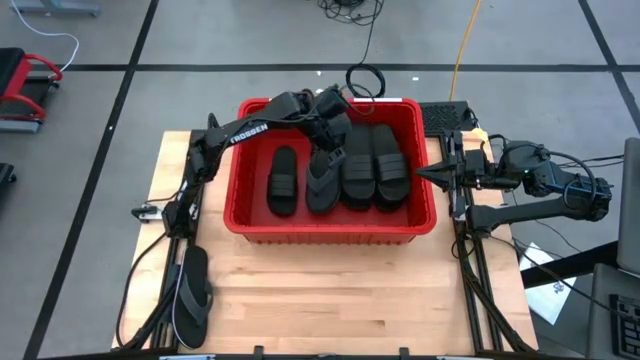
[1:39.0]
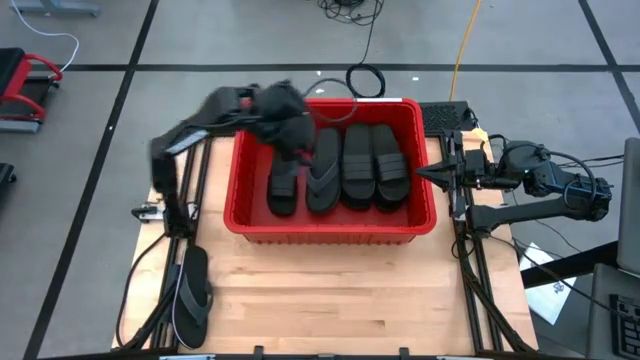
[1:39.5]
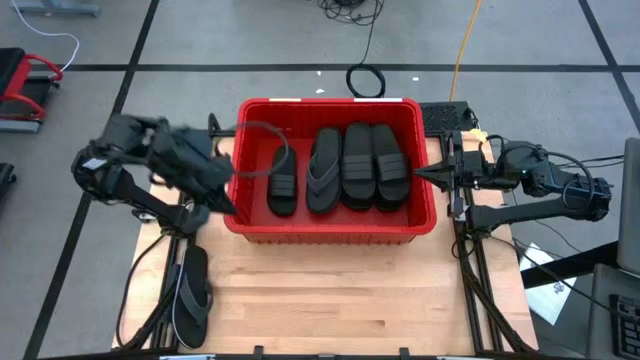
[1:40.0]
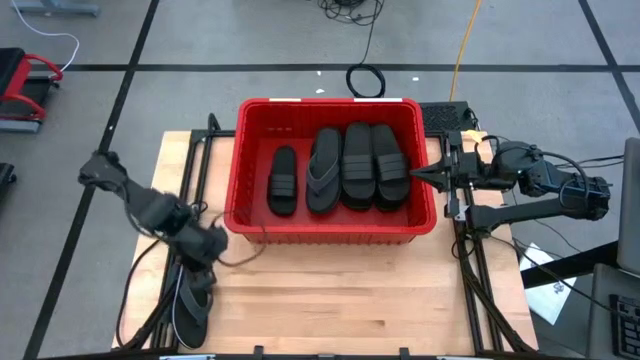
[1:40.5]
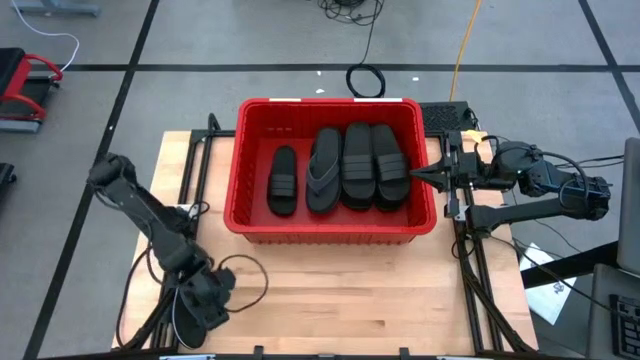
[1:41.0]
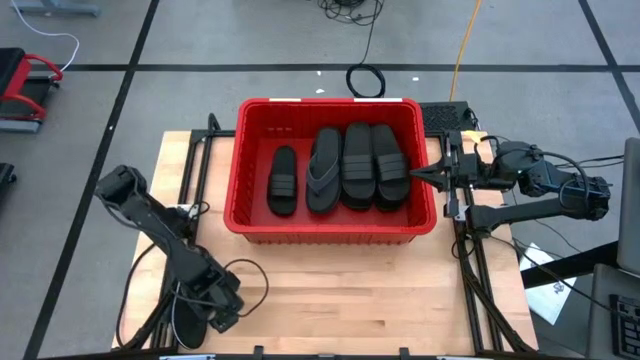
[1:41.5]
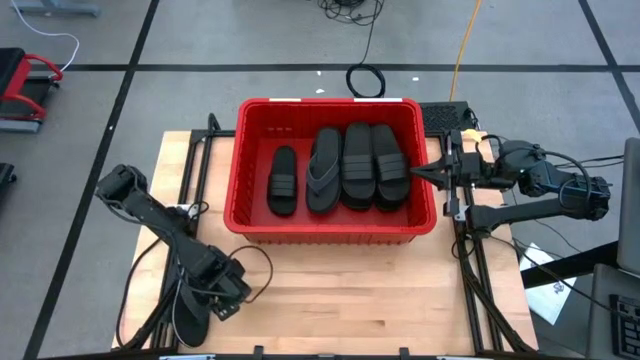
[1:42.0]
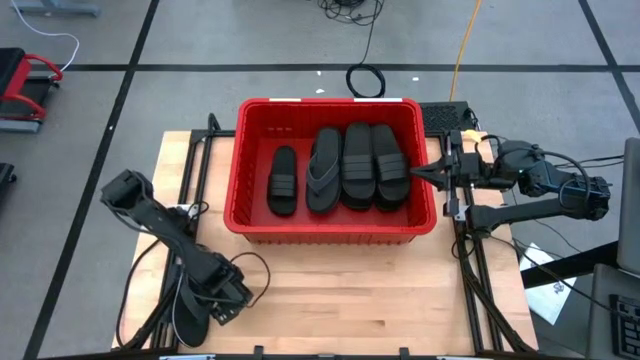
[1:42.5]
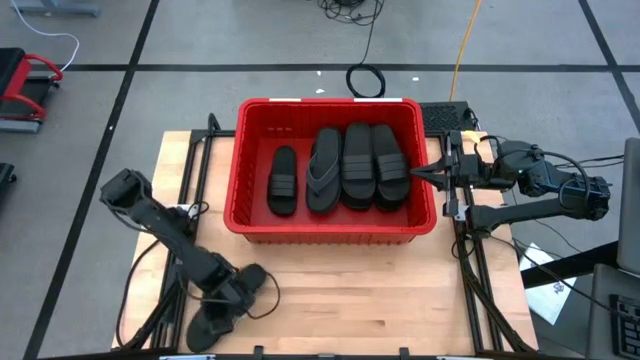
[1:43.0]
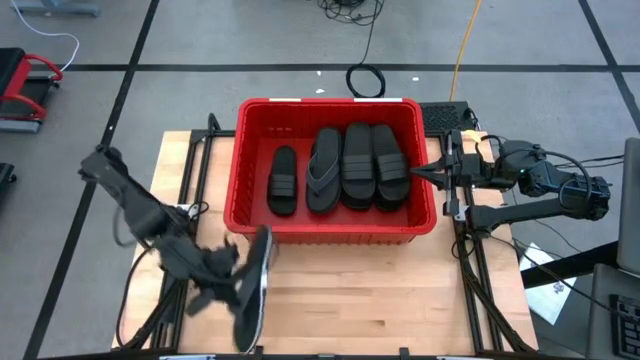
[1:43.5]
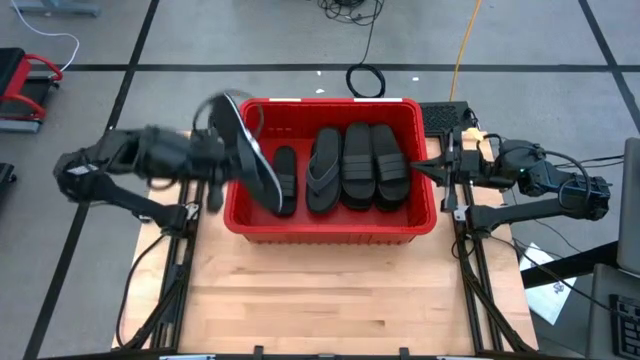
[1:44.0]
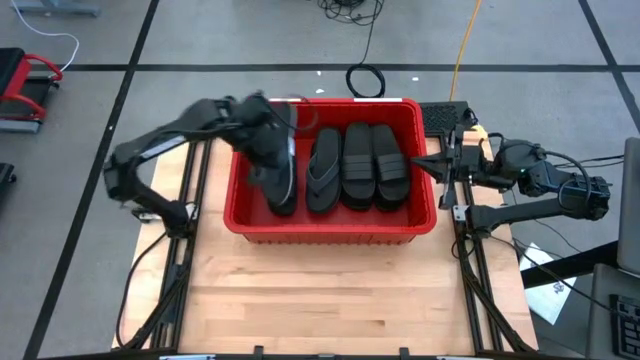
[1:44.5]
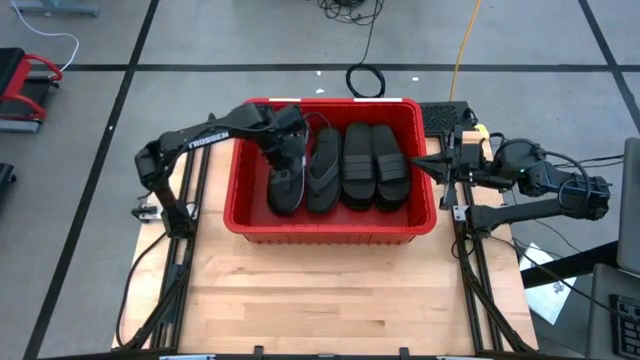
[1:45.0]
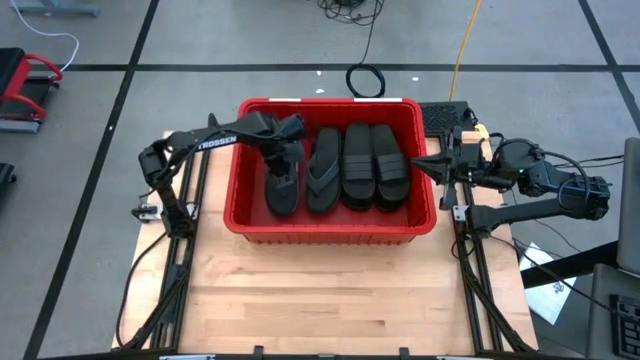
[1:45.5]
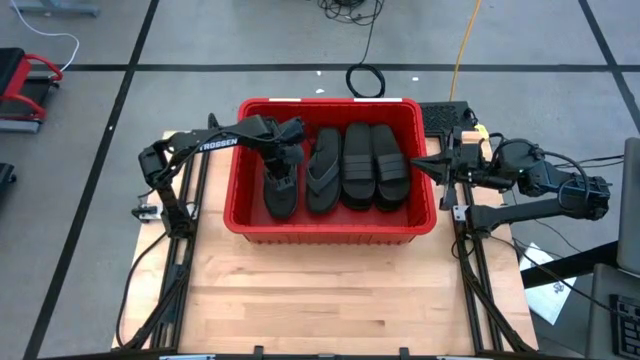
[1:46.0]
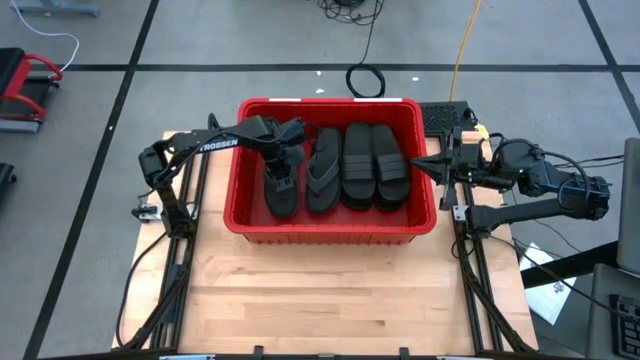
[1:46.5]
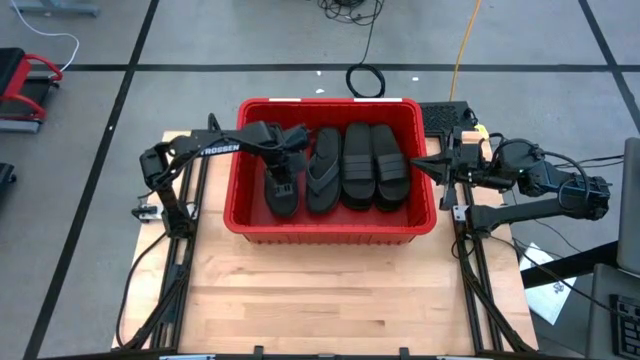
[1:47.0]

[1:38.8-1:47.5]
Task: Pick and place slides into bin
Put the black slipper into the red bin

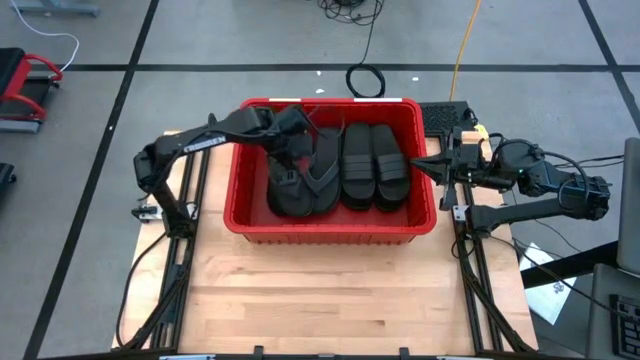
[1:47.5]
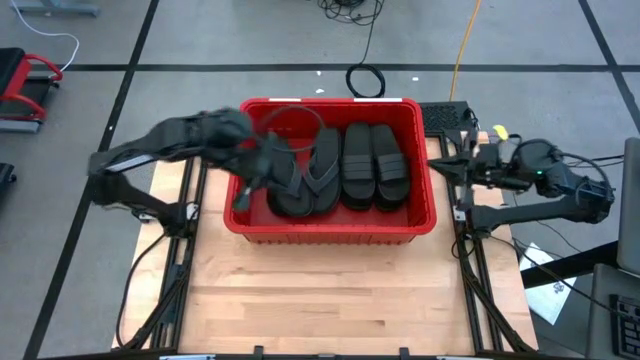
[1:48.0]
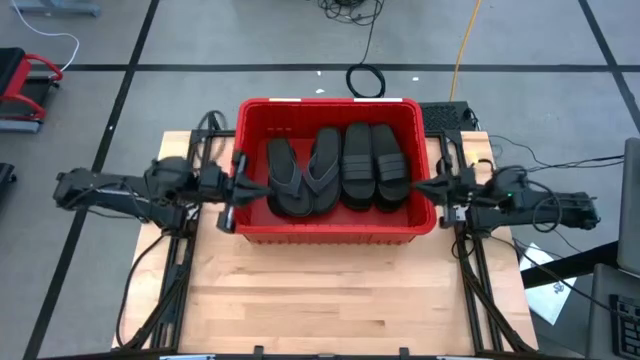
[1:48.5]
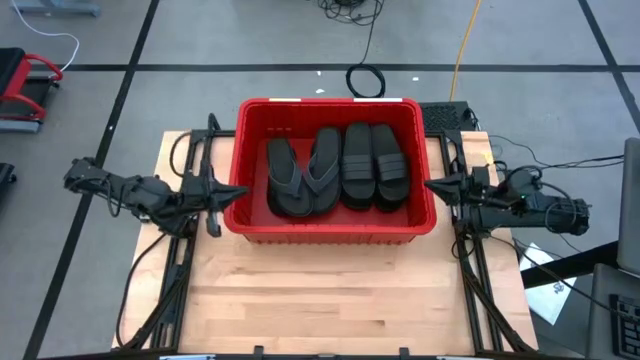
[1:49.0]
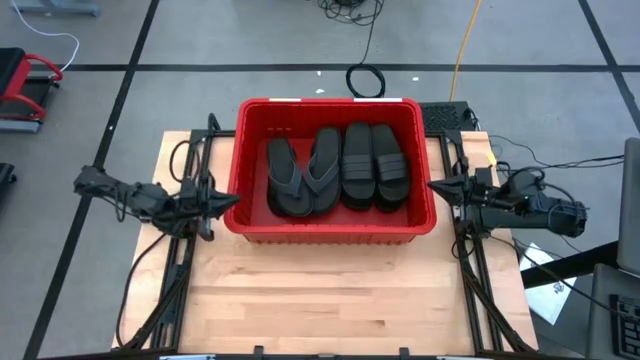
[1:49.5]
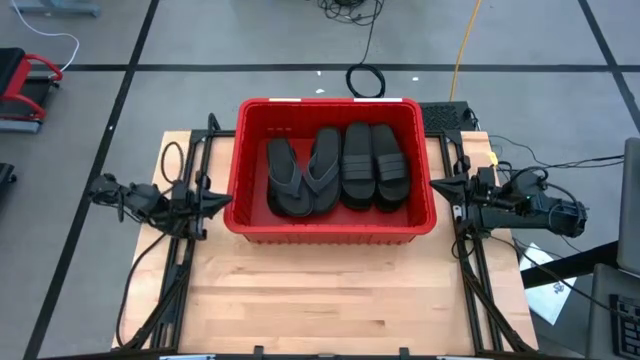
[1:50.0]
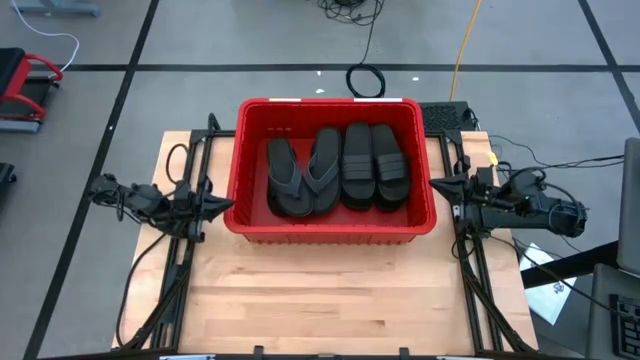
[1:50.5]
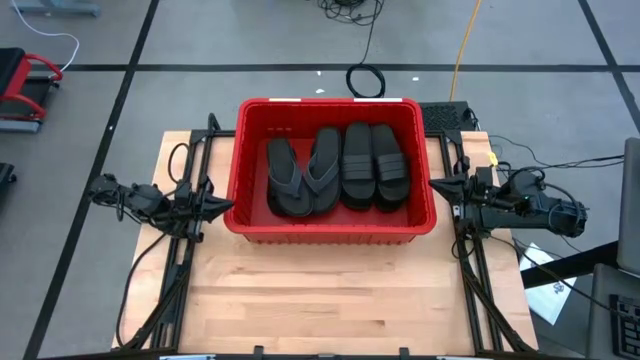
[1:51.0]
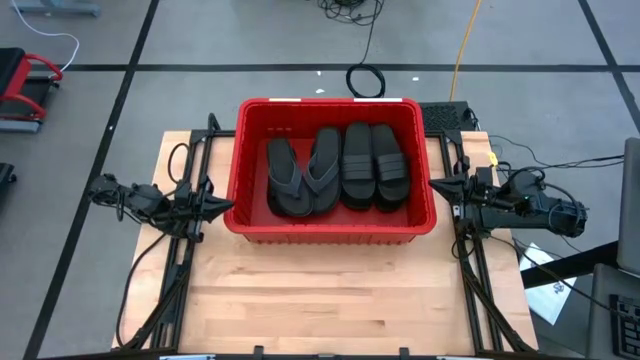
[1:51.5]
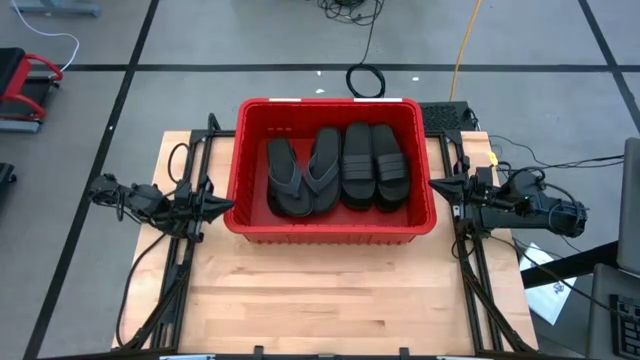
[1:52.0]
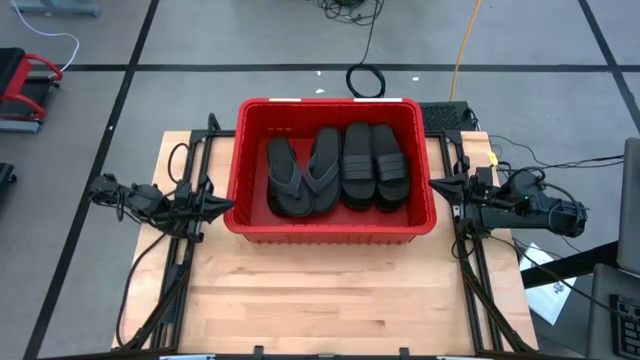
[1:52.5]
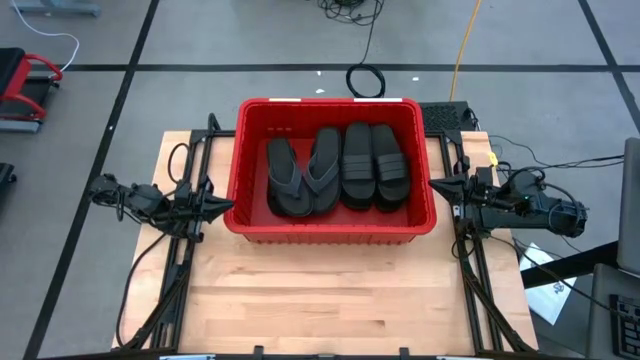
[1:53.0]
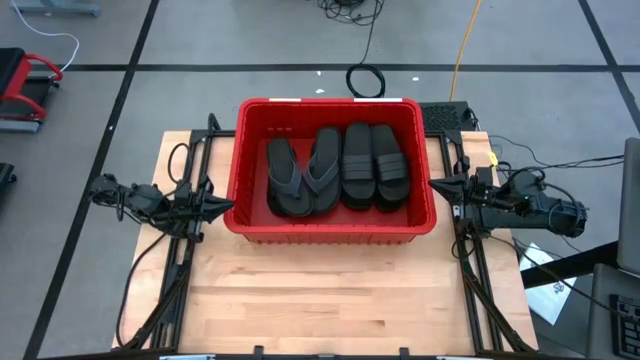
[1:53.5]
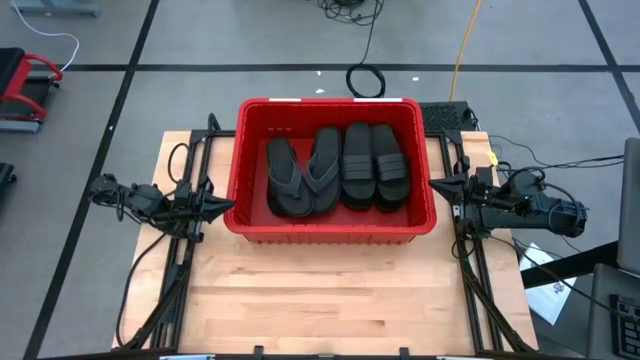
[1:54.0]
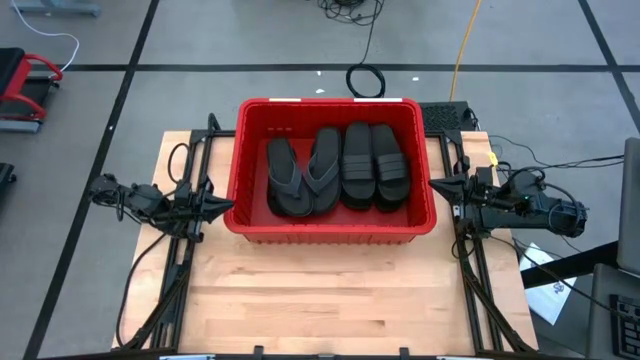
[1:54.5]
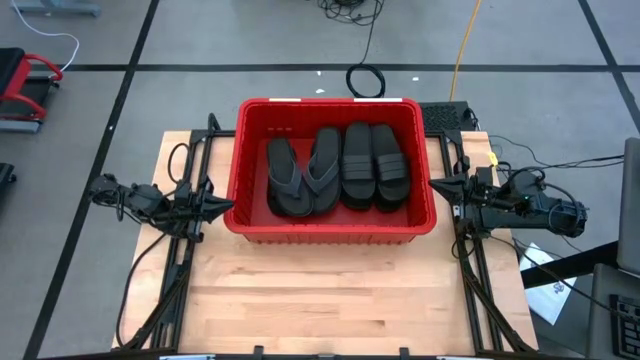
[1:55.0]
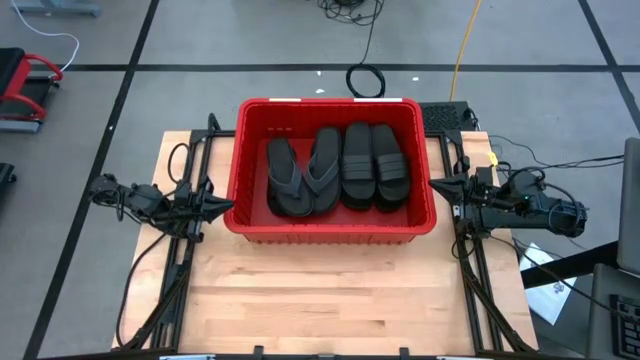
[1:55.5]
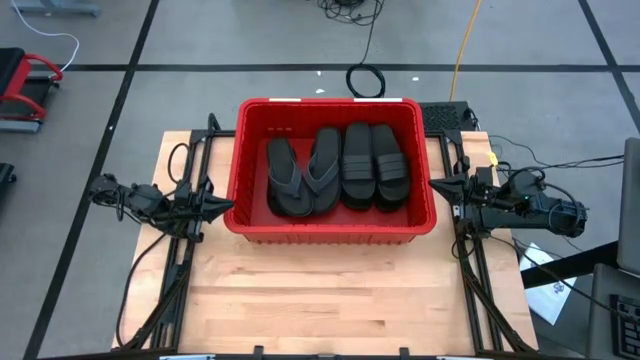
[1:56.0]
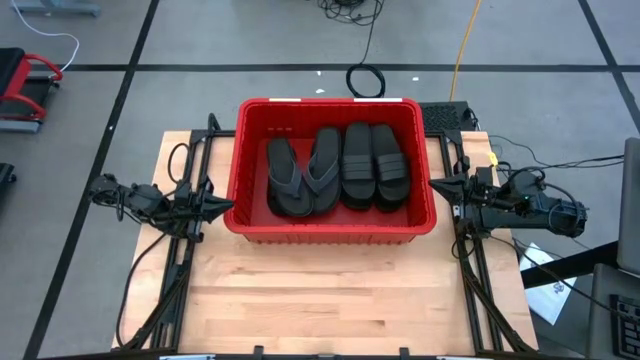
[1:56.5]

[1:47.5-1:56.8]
Return to Home Position

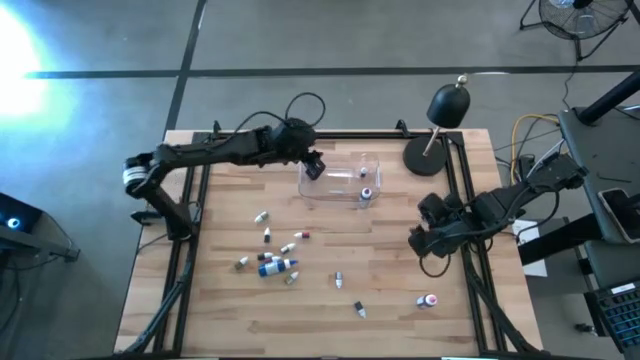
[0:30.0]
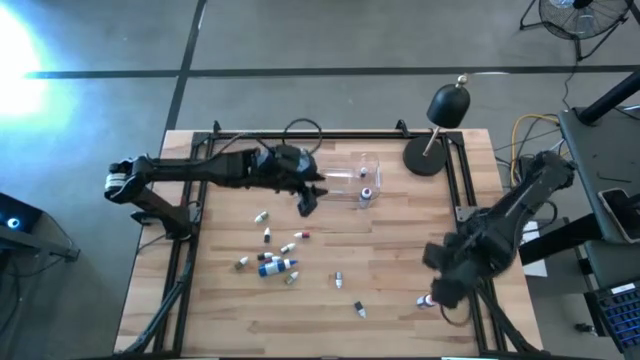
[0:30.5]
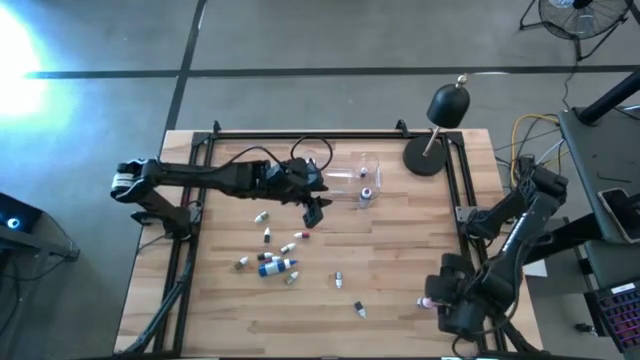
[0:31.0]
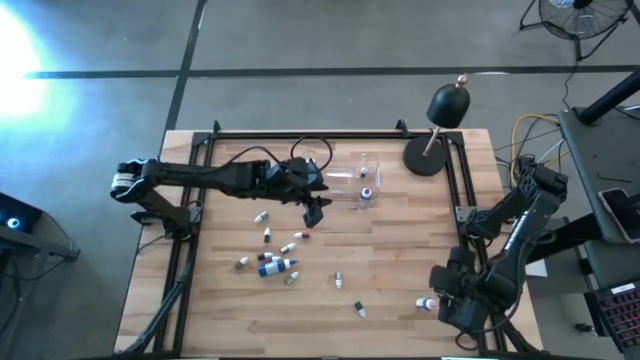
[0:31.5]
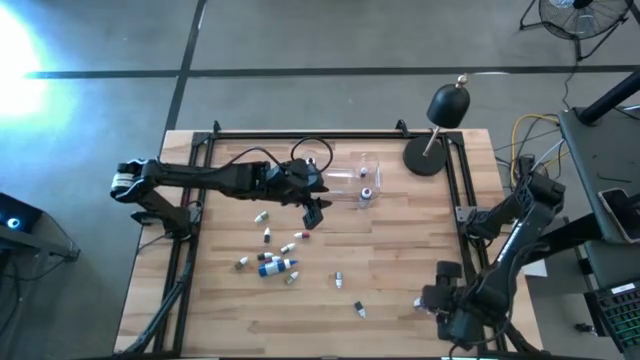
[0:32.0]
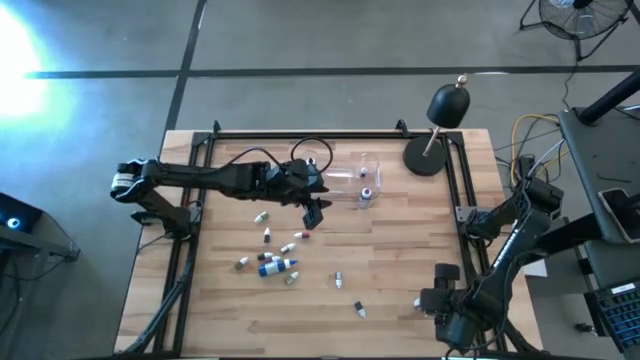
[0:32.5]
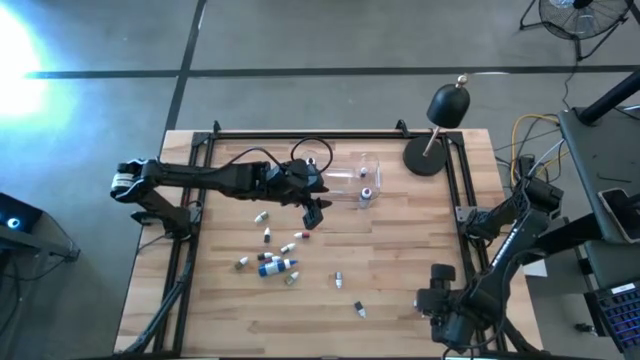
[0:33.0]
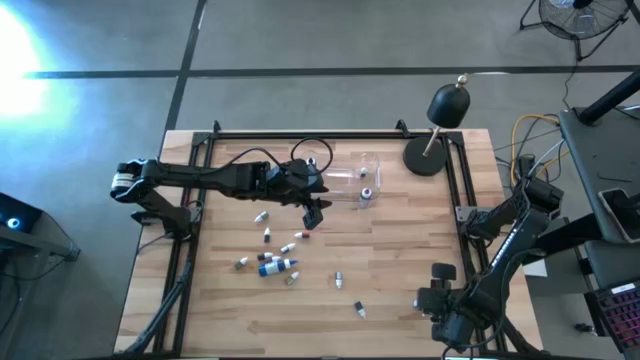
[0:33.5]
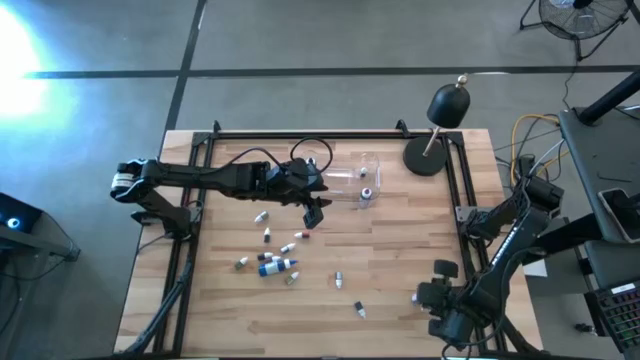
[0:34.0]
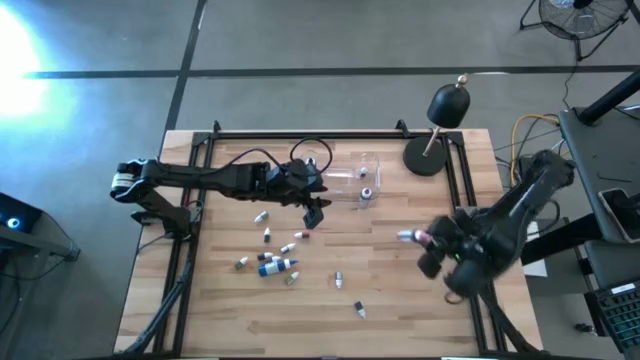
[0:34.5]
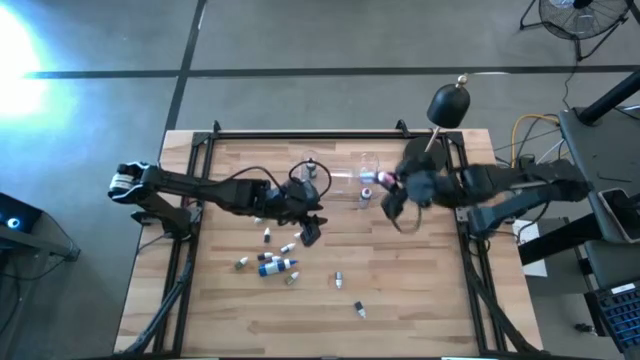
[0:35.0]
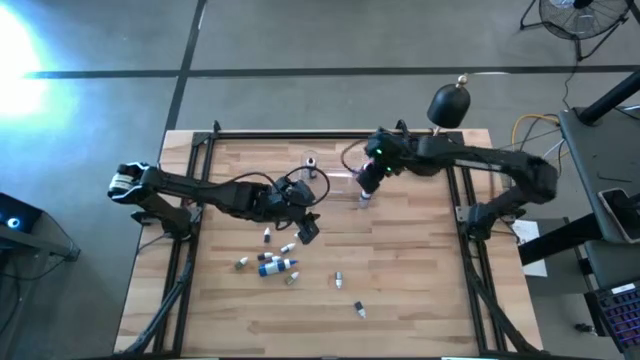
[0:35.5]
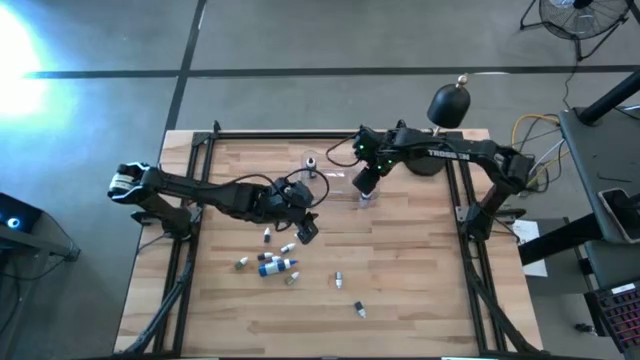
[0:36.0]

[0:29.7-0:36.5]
Task: Pick & Place food coloring
Put the big pink food coloring bottle into the transparent bin
